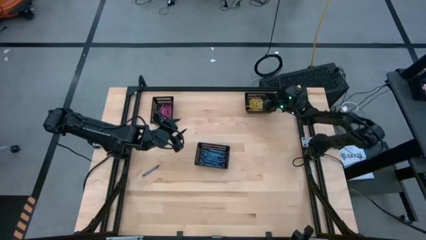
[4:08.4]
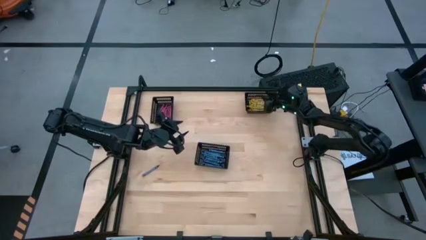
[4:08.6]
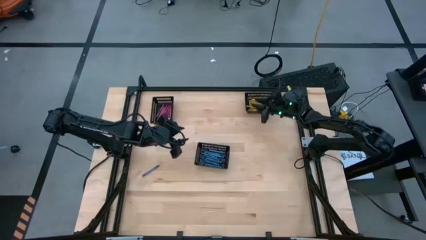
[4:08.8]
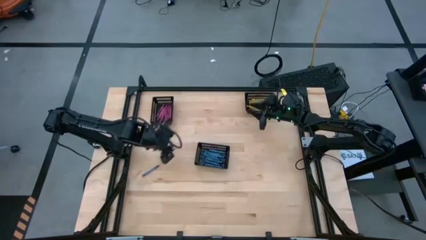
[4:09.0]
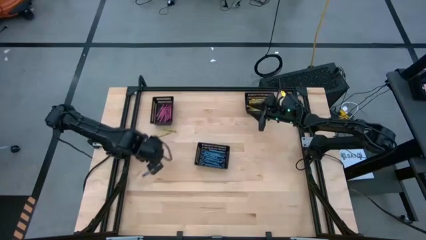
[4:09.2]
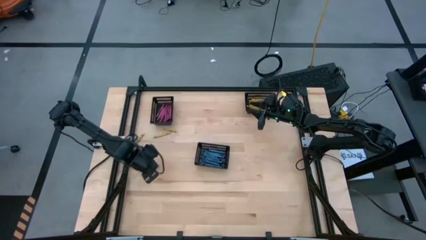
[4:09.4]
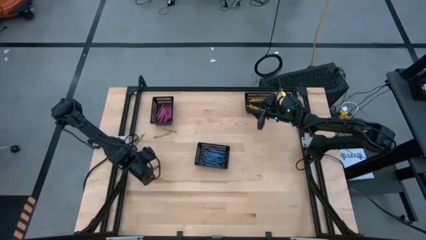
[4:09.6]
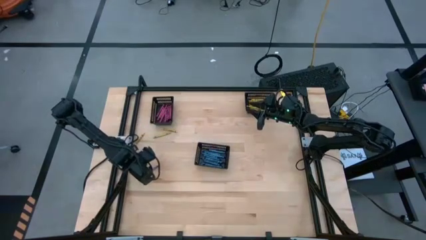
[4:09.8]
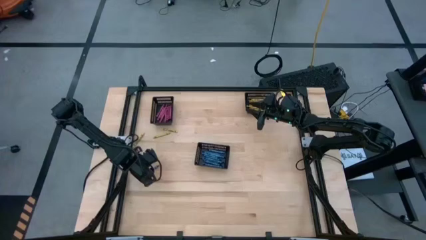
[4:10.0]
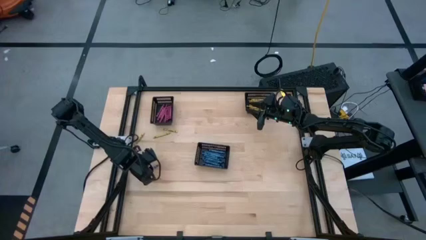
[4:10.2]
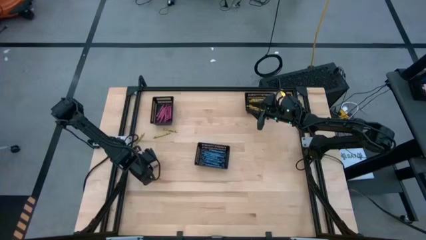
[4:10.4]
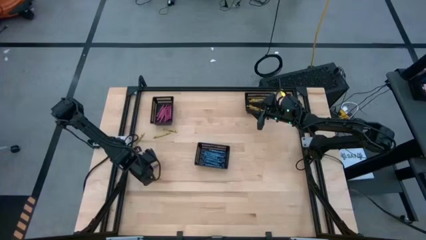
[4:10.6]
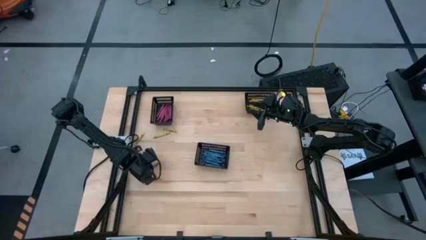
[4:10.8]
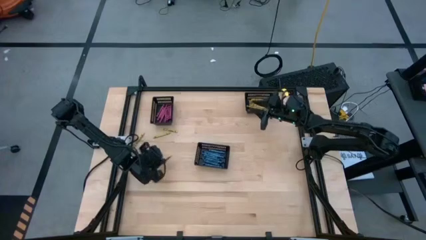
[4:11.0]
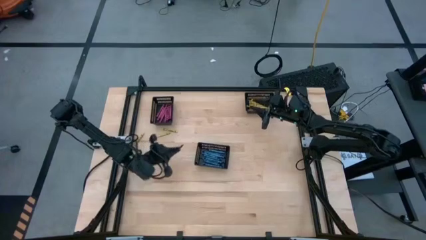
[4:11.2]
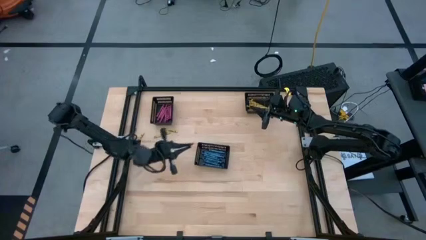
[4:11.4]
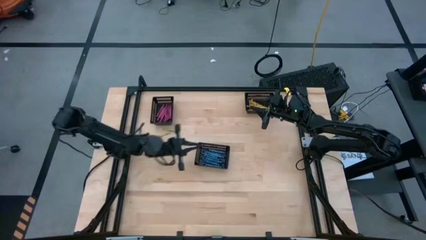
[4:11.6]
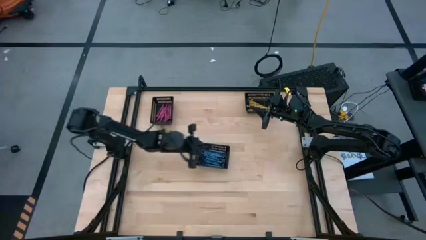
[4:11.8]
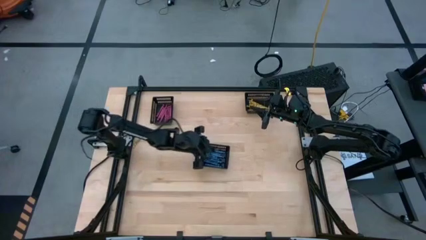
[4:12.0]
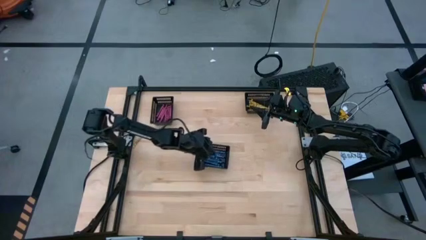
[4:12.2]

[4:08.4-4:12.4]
Task: Sort crayons
Put the blue crayon into the bottom black bin

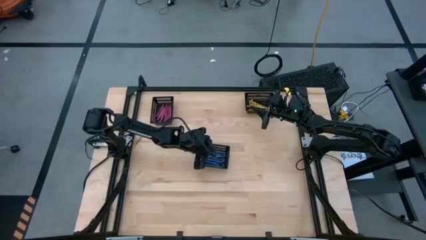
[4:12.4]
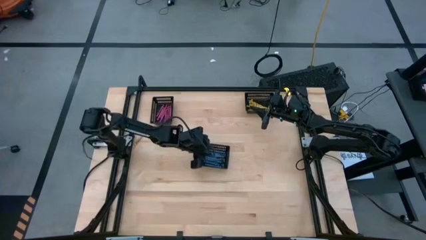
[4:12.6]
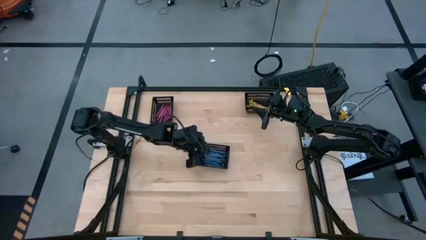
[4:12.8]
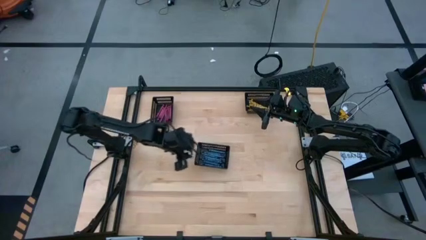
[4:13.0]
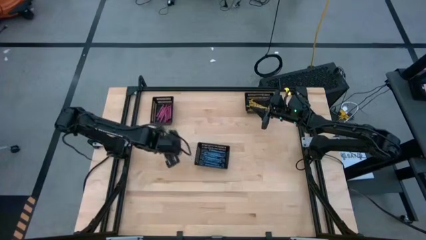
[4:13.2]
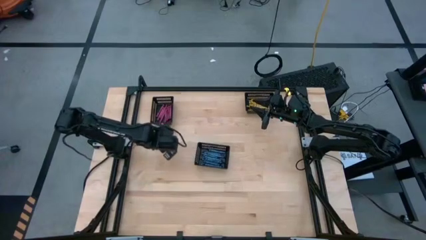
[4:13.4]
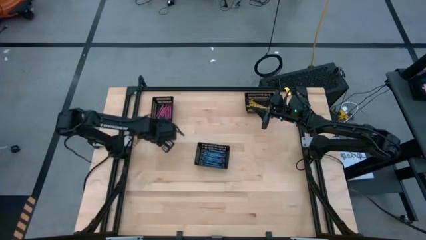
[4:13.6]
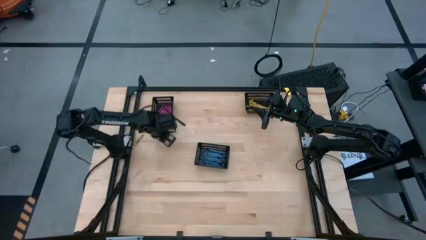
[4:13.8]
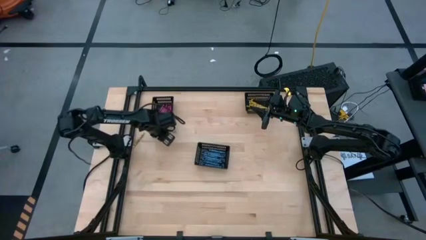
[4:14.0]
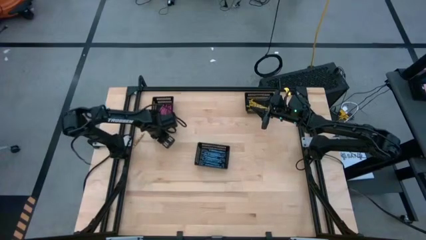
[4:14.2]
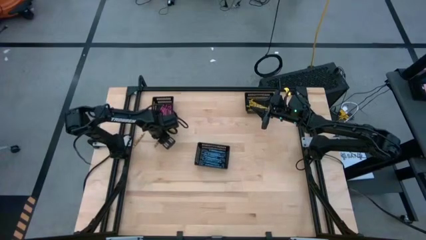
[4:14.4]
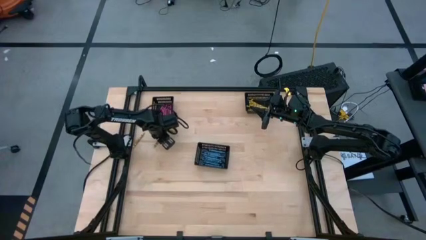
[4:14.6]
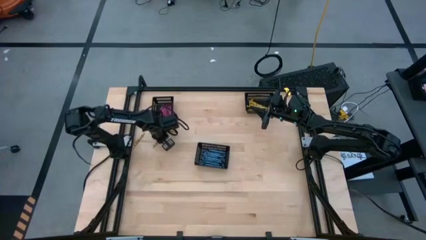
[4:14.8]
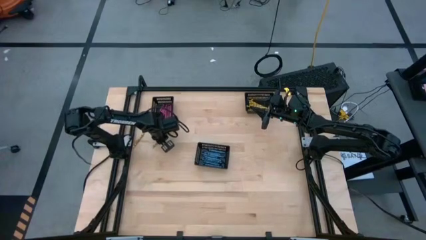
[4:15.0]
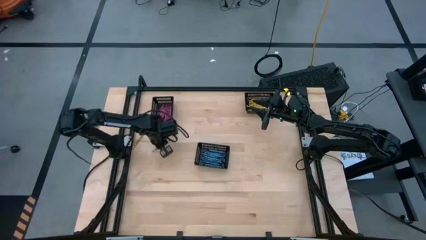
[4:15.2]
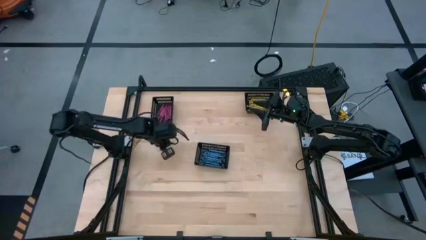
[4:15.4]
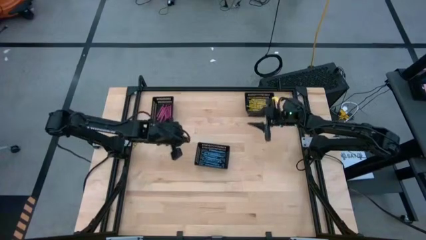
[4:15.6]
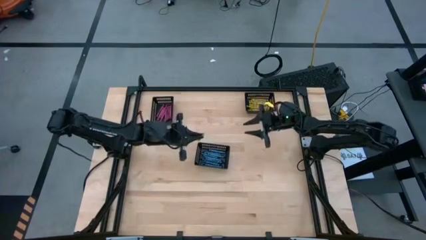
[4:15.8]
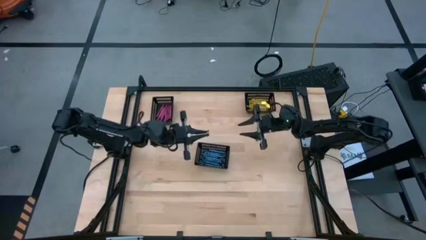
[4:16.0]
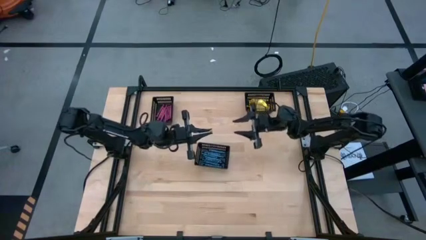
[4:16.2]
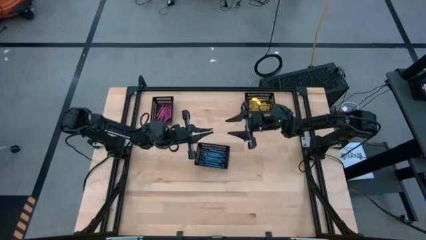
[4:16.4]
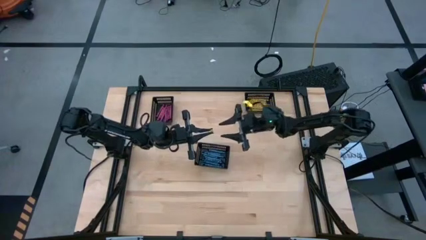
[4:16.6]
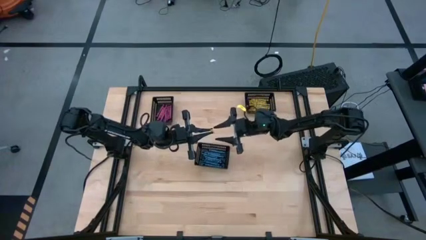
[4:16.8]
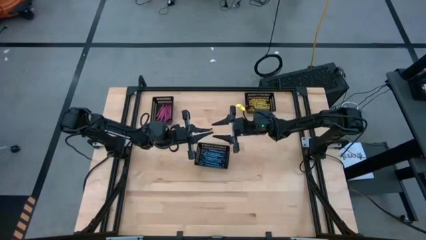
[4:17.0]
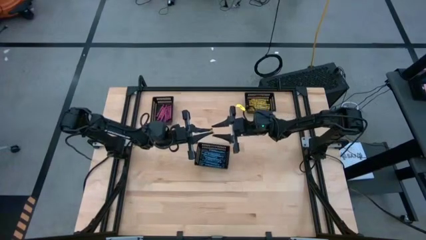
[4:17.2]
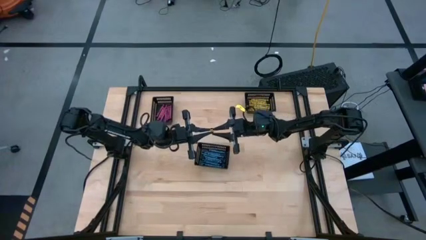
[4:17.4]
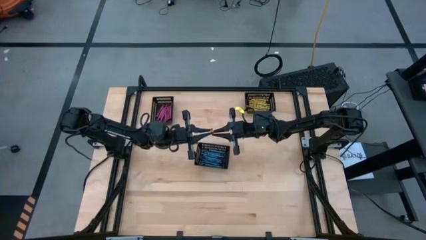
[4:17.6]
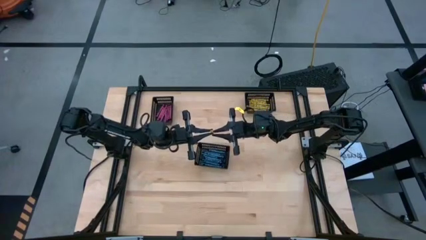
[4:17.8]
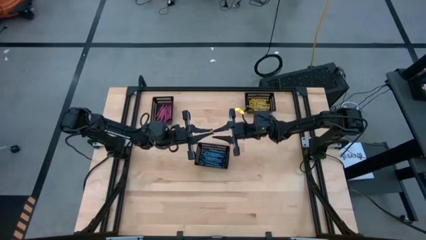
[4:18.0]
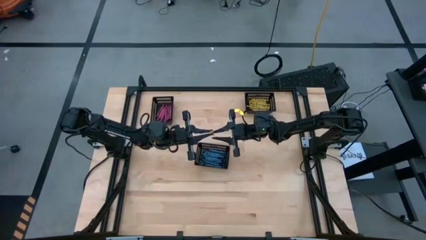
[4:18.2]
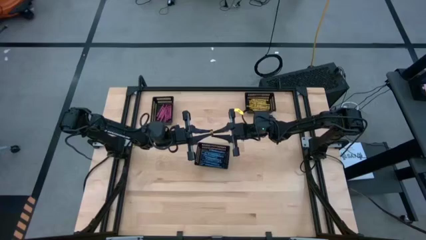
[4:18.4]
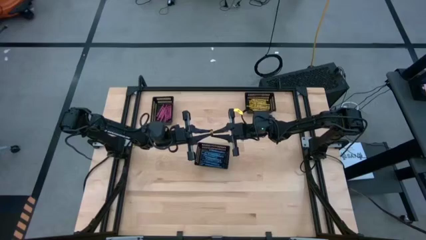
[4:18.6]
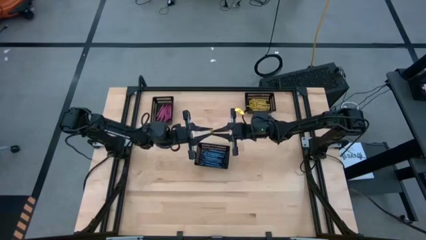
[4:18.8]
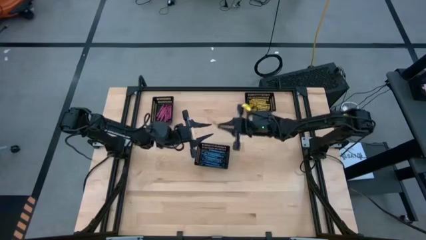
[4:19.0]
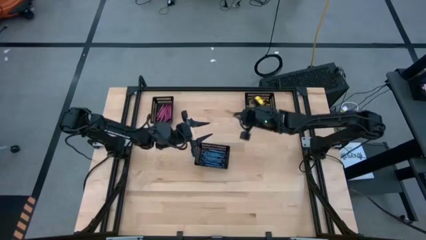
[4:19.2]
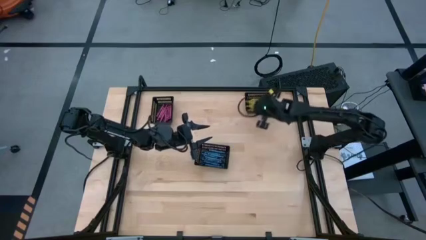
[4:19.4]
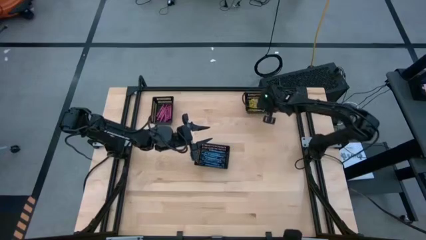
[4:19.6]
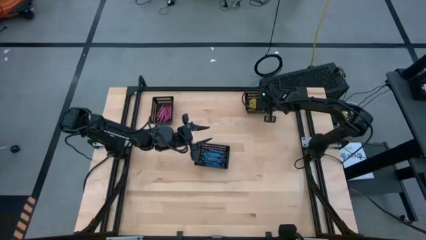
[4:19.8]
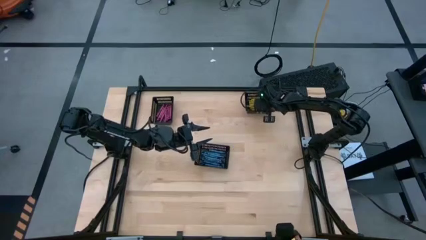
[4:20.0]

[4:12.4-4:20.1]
Put the yellow crayon into the top right black bin

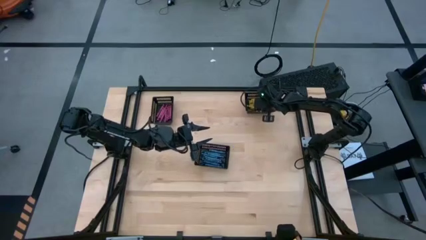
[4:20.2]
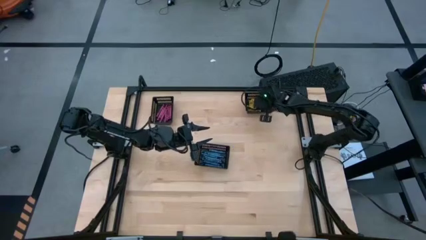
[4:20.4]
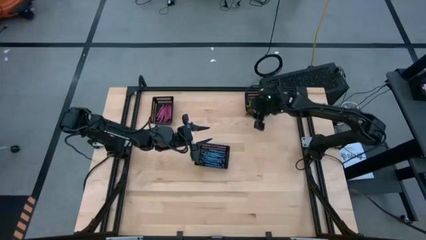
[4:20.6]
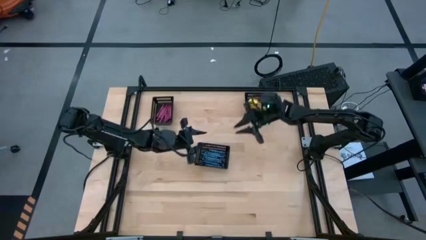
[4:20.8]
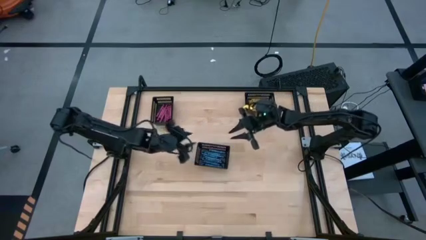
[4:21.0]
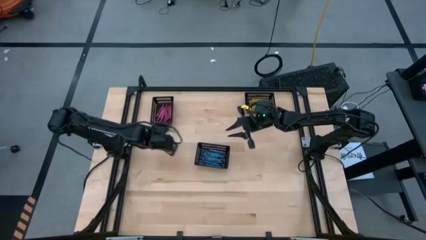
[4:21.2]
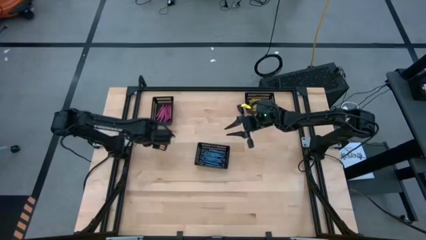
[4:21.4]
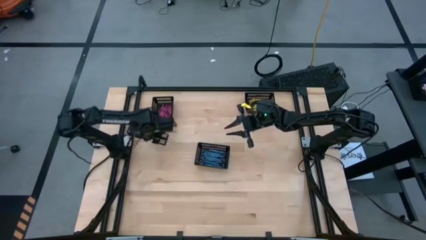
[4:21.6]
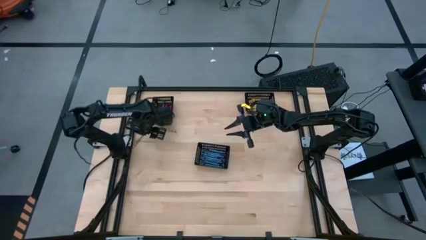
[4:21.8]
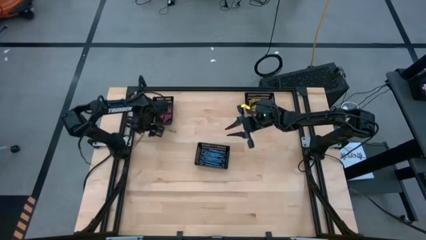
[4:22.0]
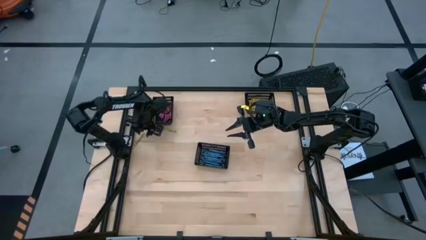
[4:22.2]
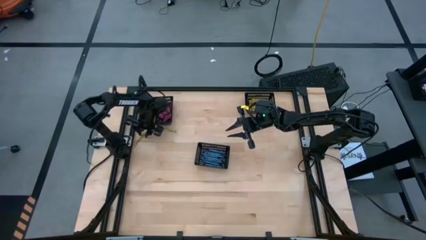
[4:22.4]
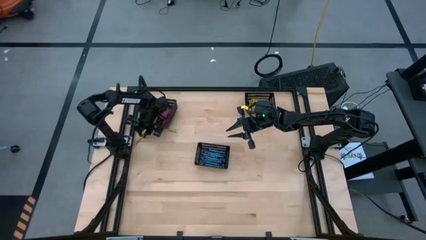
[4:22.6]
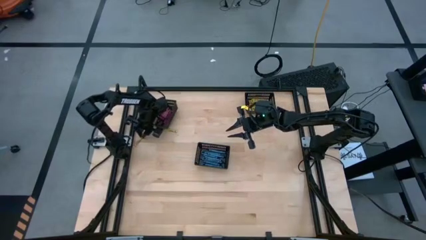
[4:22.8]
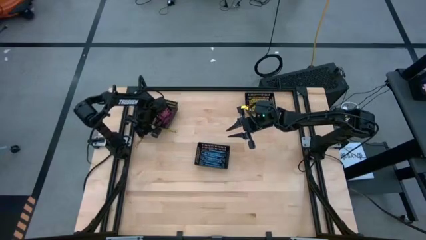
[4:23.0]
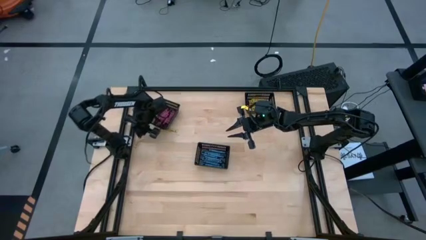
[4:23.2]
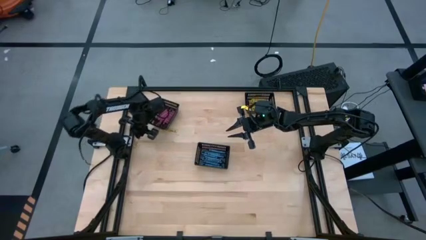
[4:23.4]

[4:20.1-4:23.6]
Put the yellow crayon into the top right black bin
